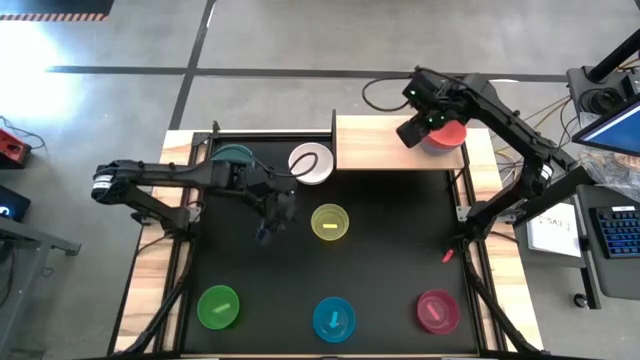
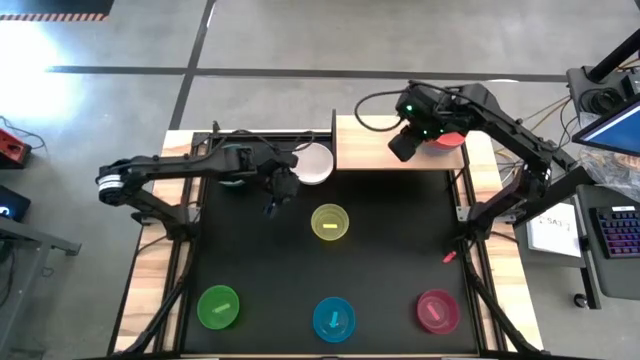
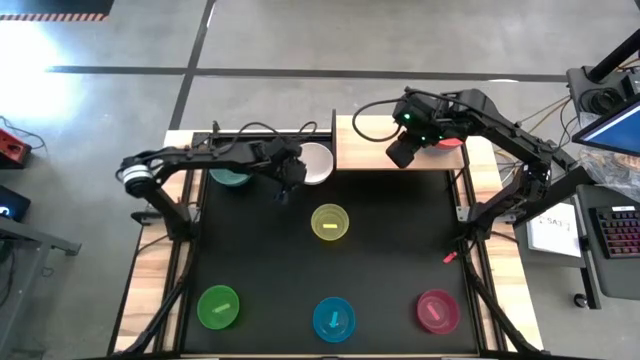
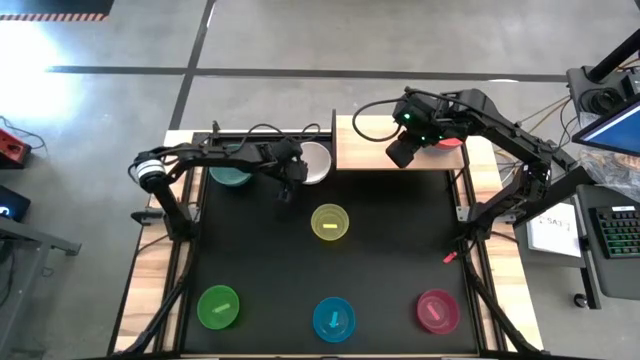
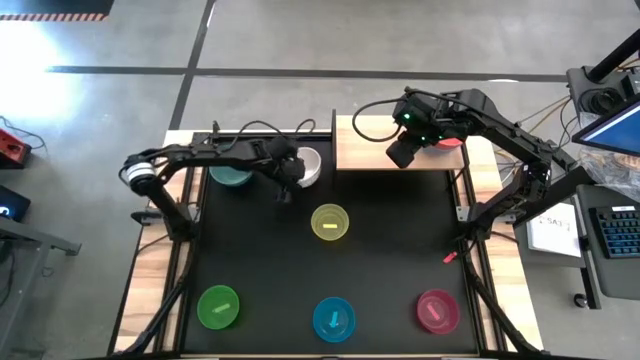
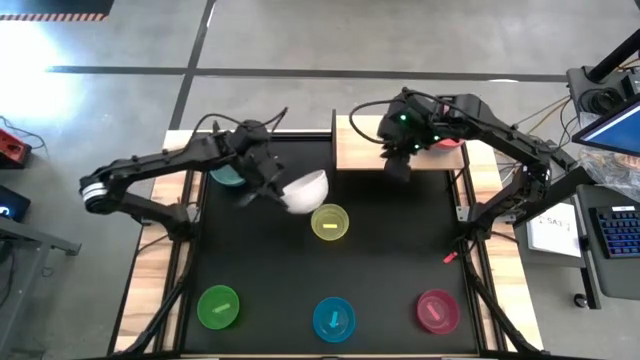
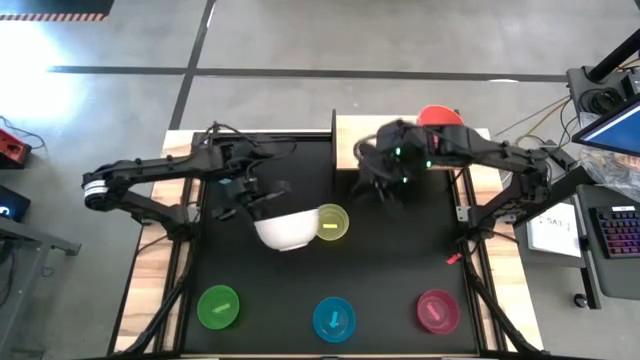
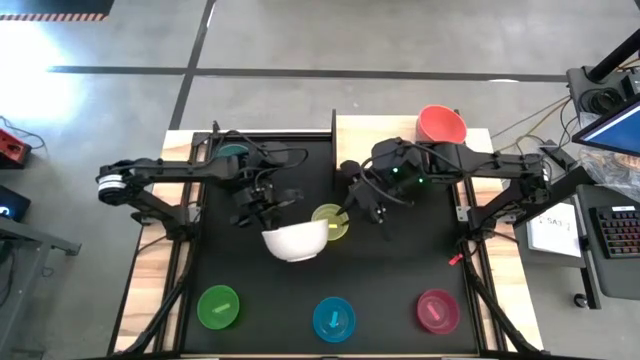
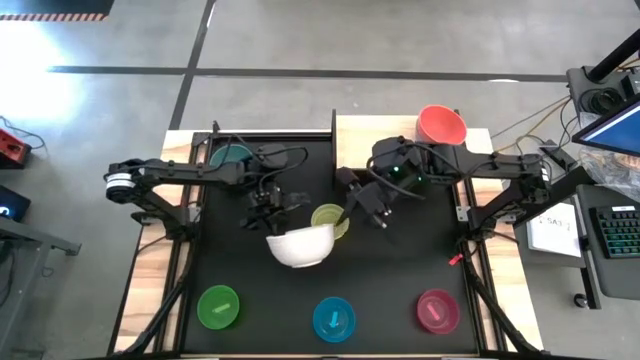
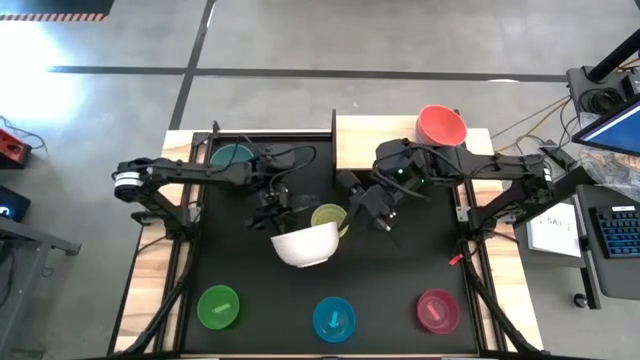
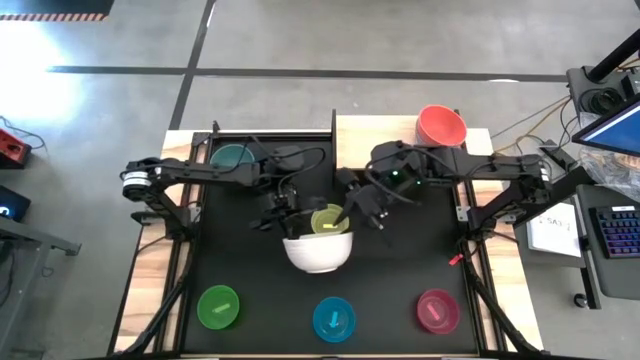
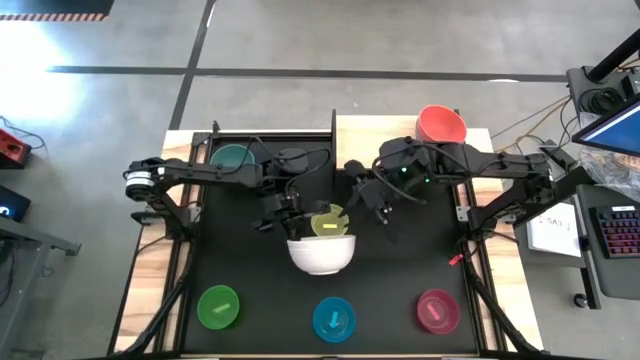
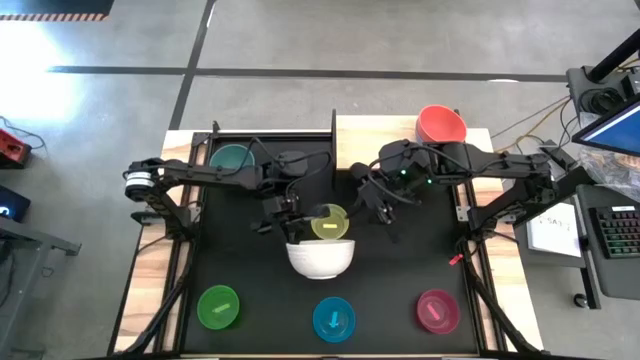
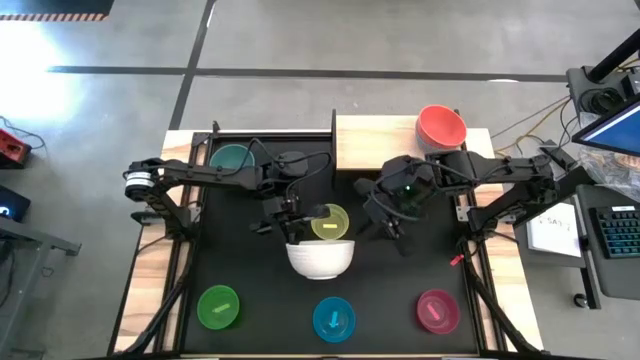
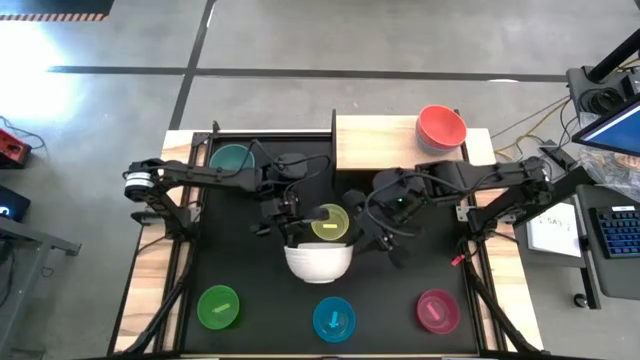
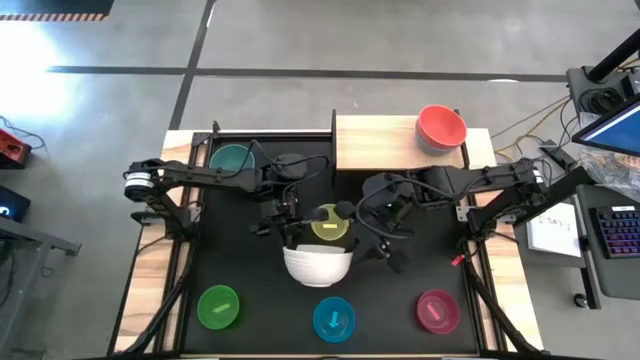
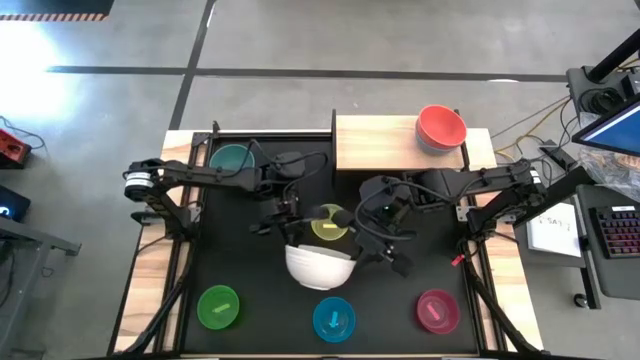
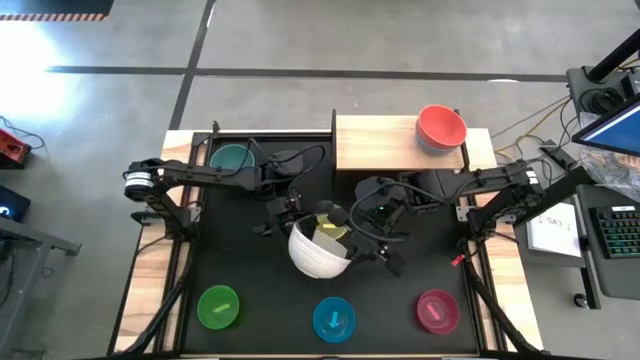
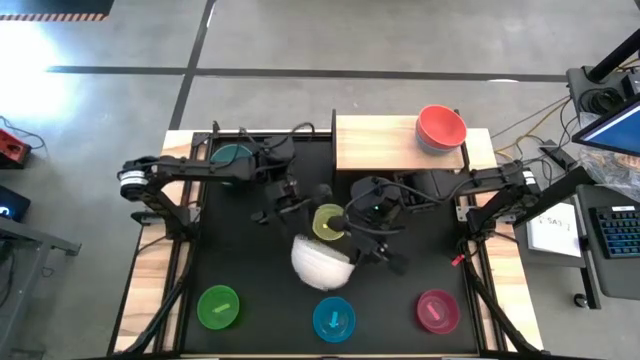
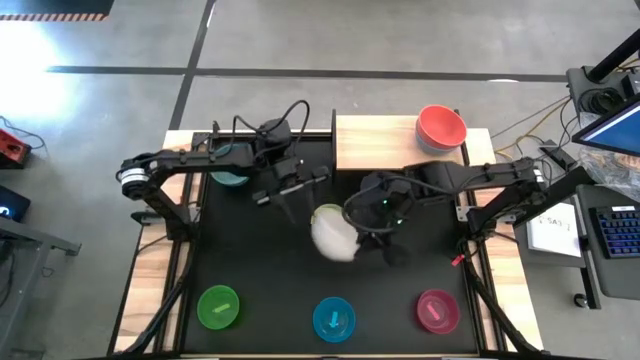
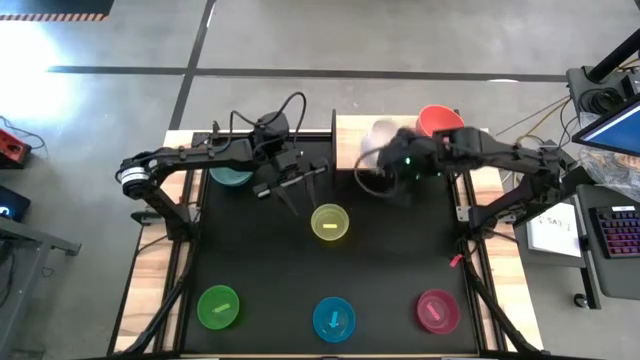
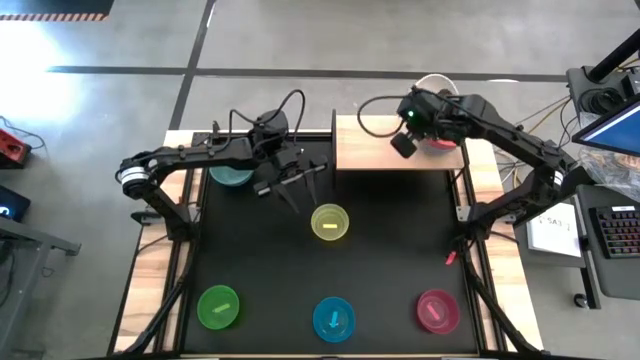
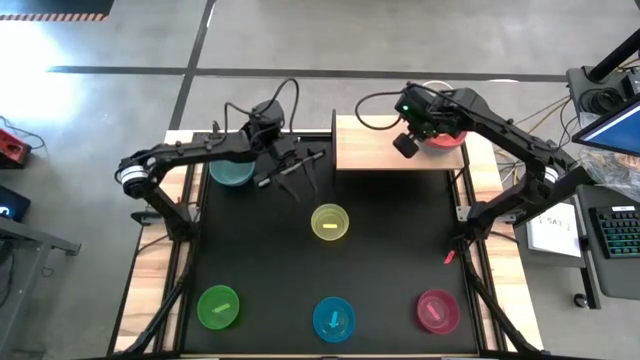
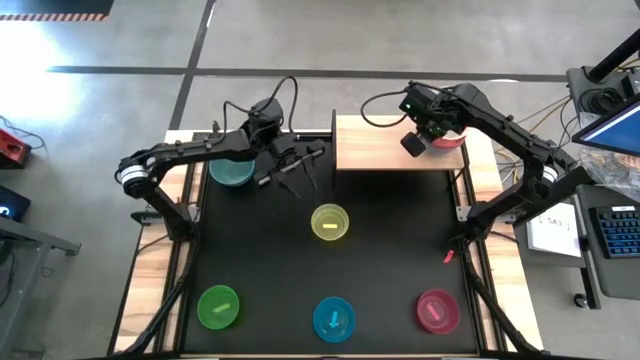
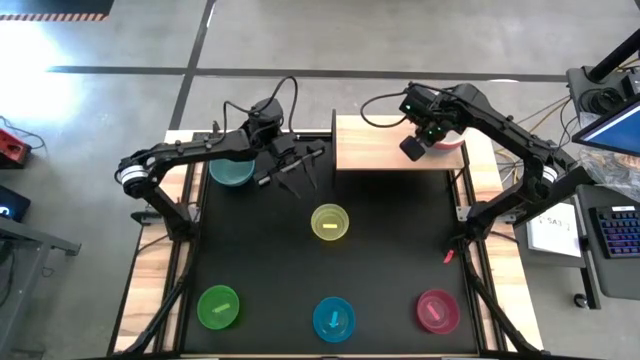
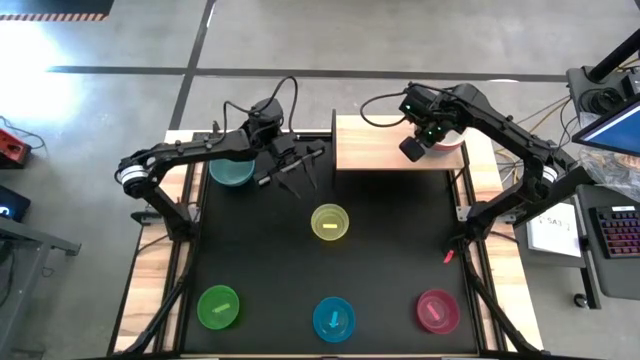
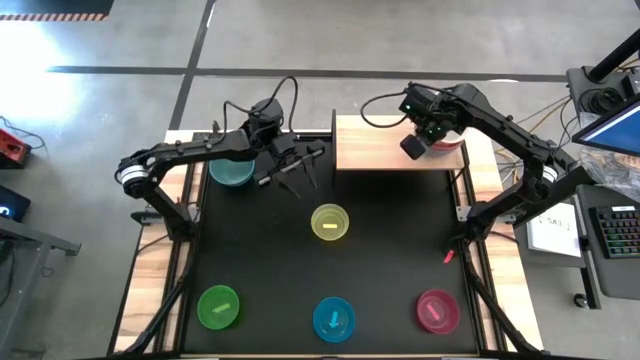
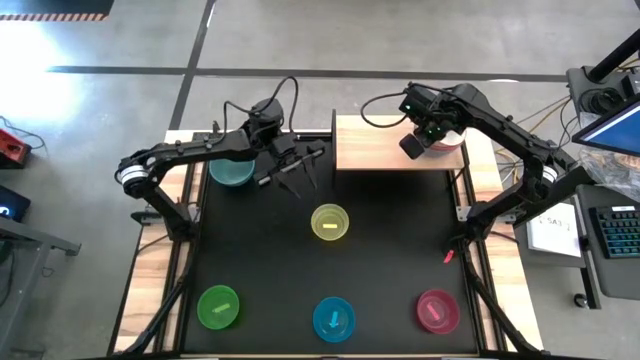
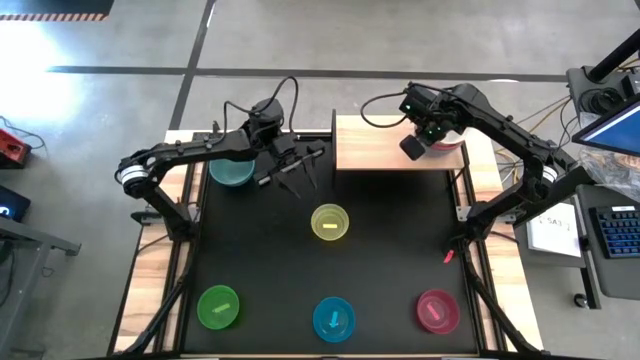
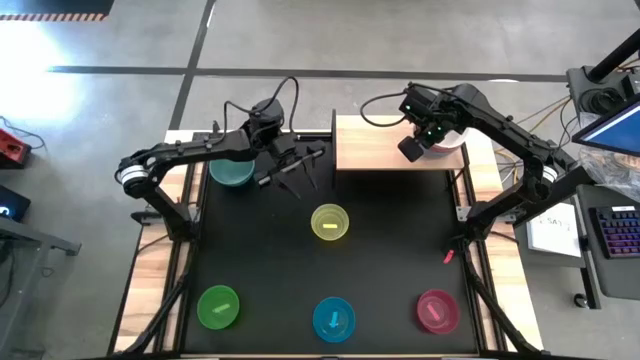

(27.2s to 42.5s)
Task: Place and stack bowls onto a shelf
Stack the white bowl on top of the orange stacked bowls on the shelf

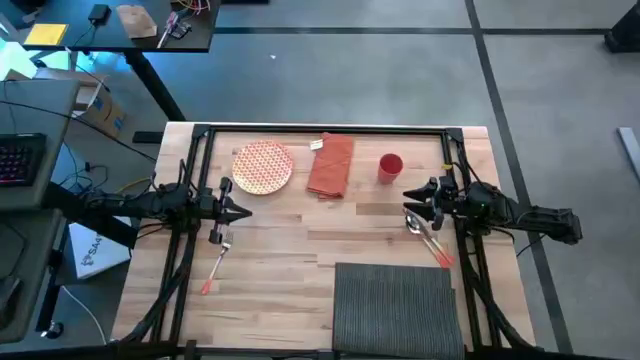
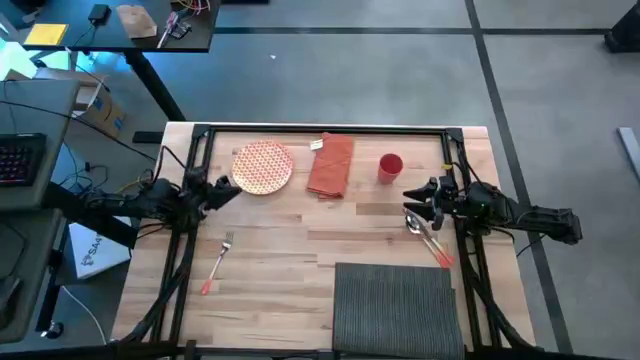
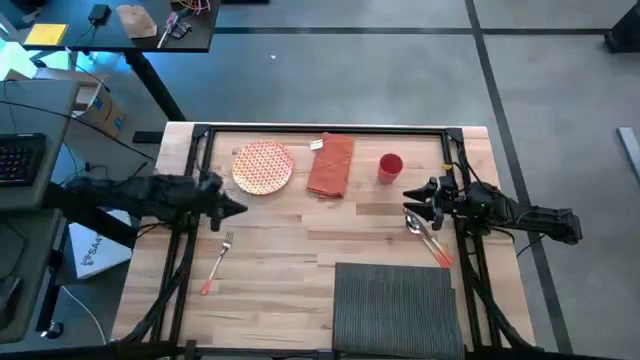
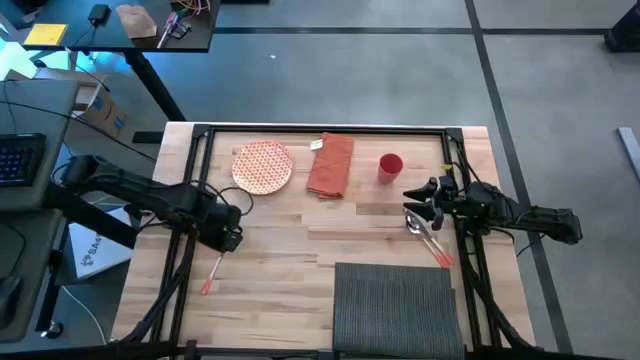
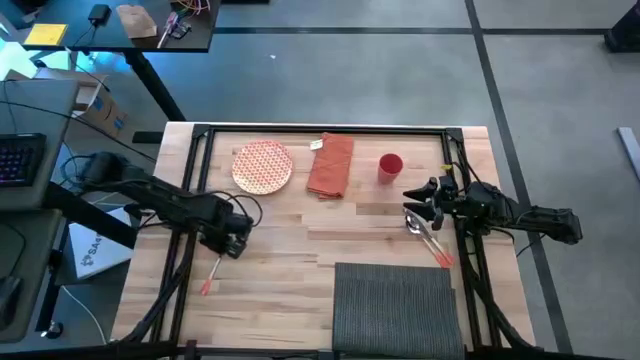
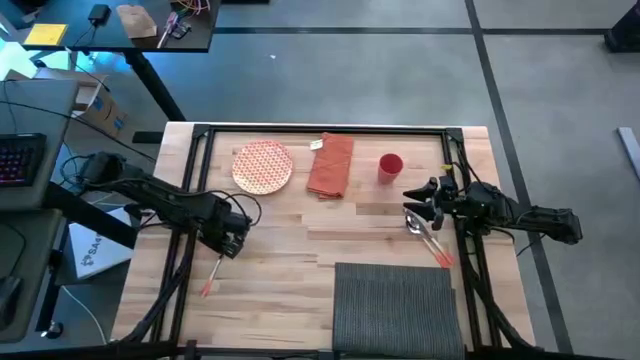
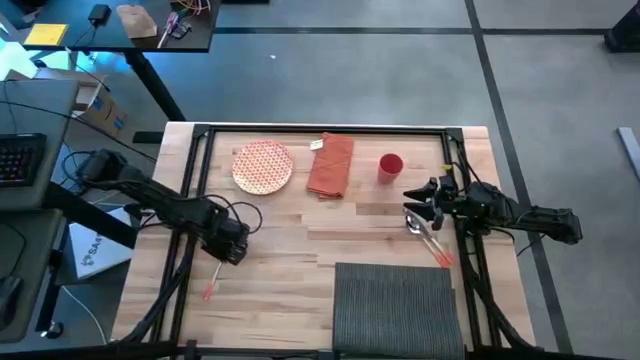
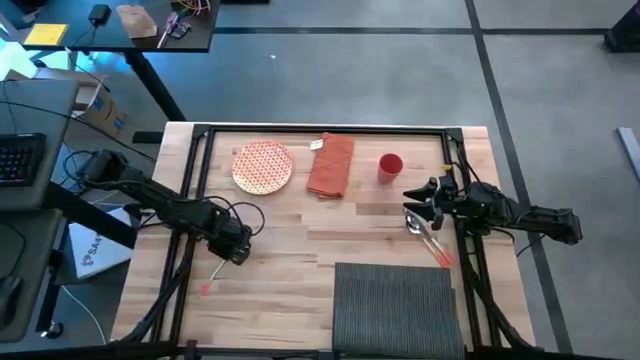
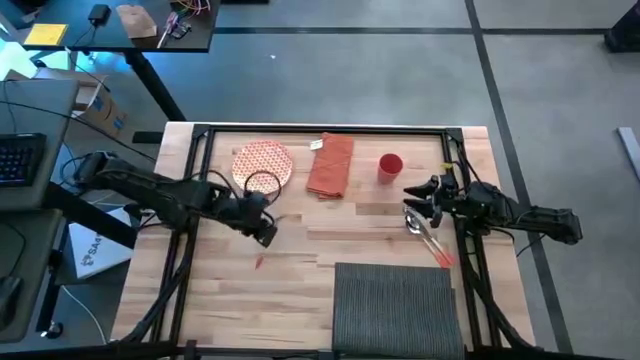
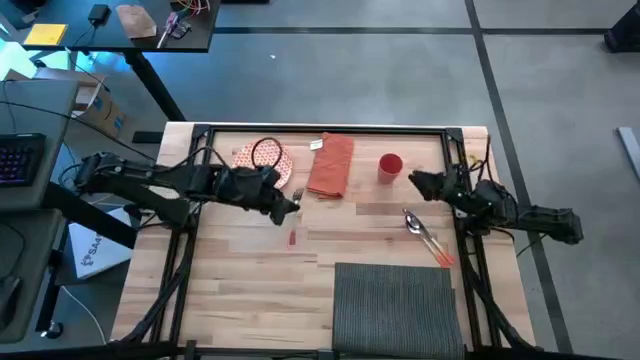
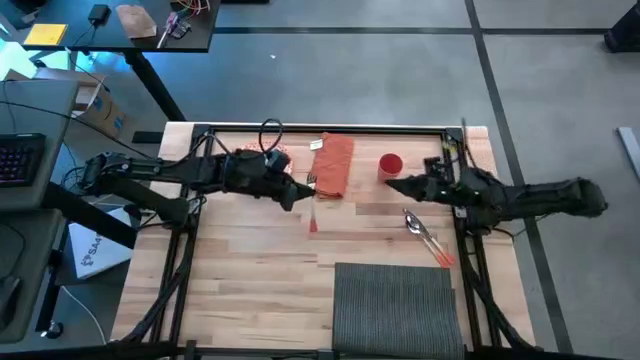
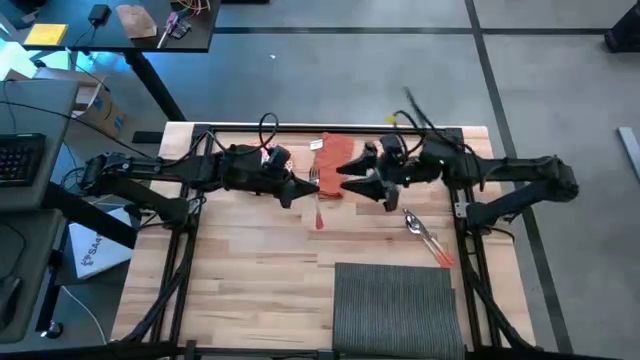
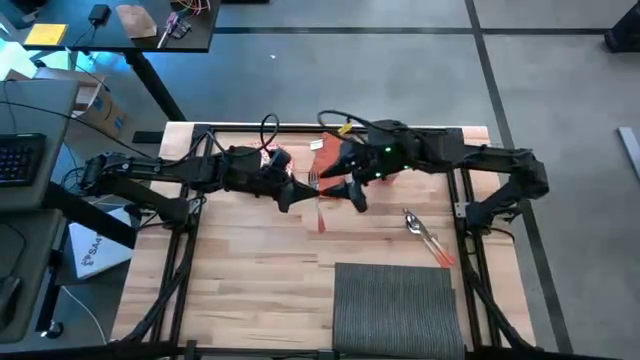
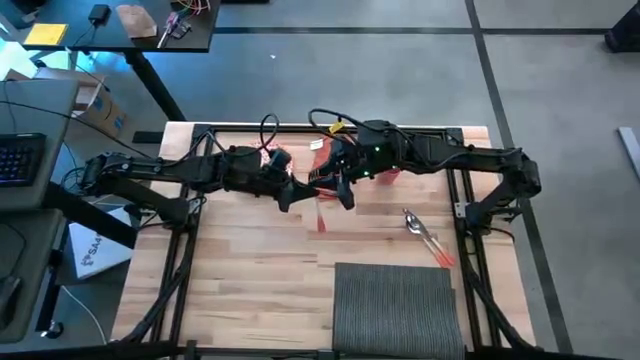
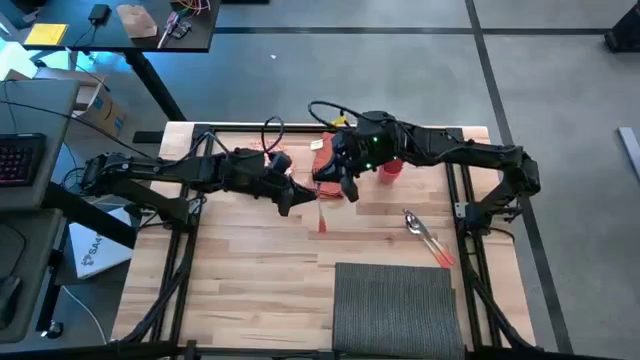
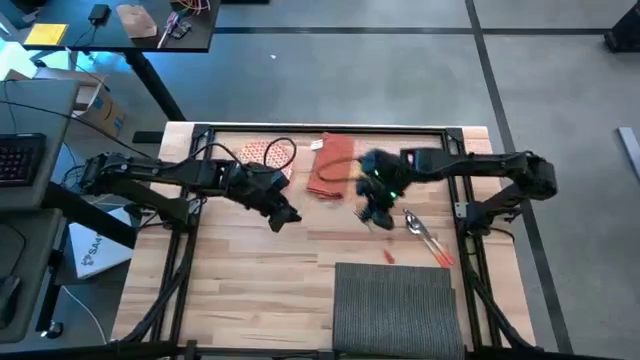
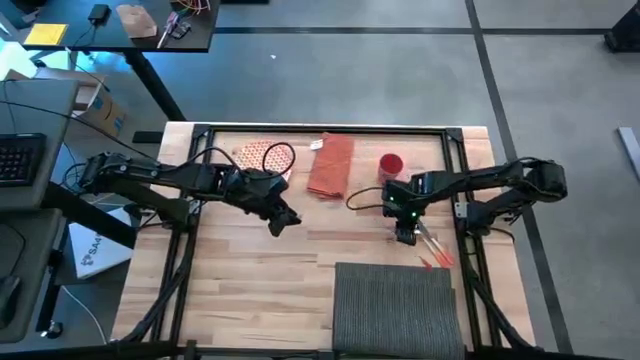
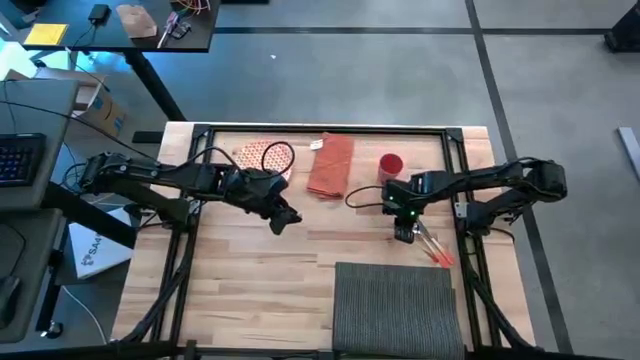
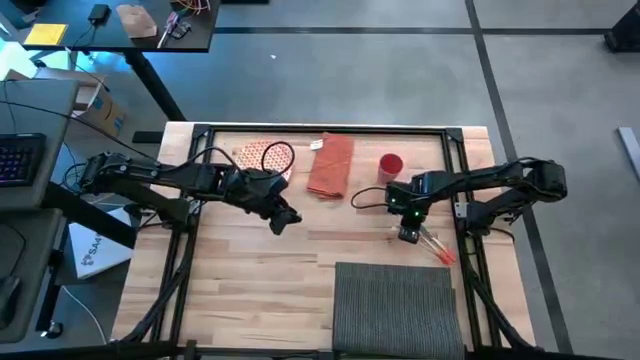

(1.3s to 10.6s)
Task: Set table place
Move the fork to the left of the spoon
